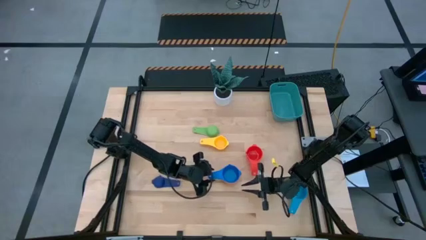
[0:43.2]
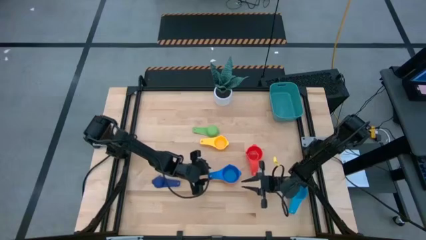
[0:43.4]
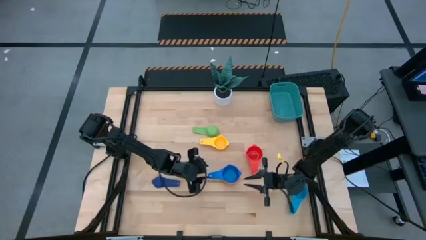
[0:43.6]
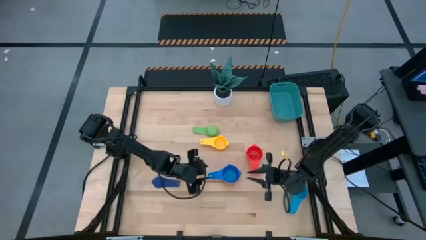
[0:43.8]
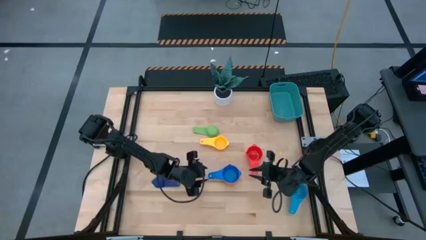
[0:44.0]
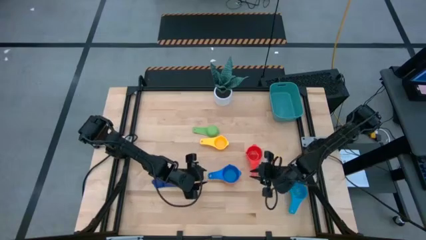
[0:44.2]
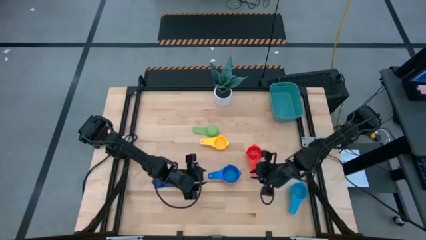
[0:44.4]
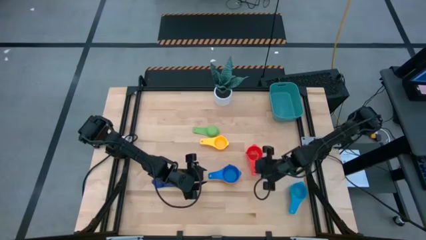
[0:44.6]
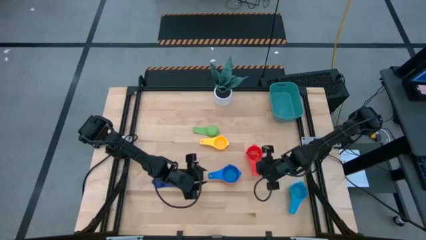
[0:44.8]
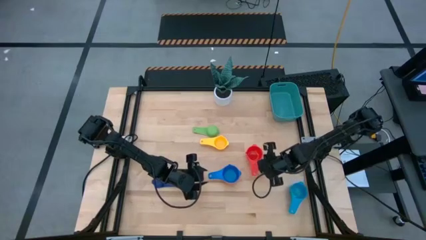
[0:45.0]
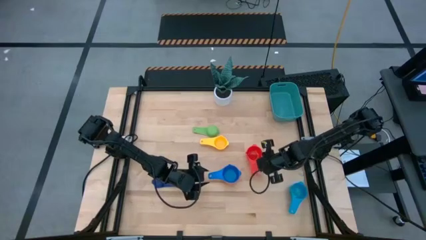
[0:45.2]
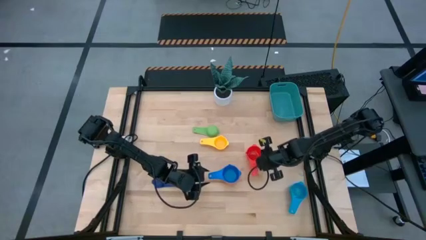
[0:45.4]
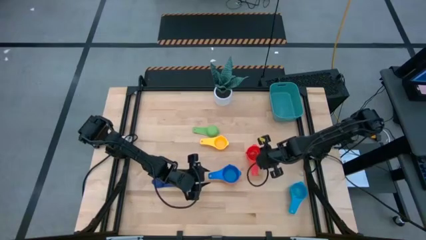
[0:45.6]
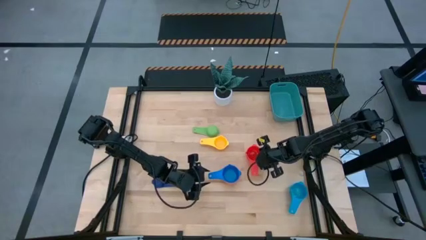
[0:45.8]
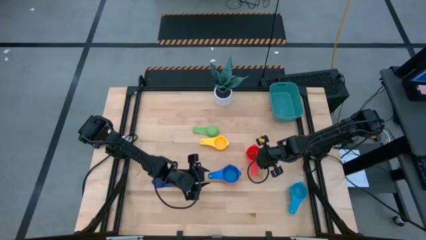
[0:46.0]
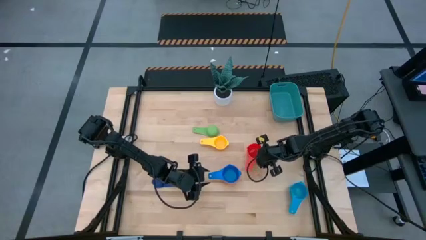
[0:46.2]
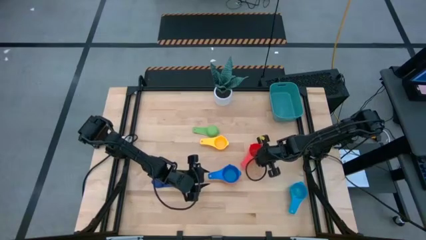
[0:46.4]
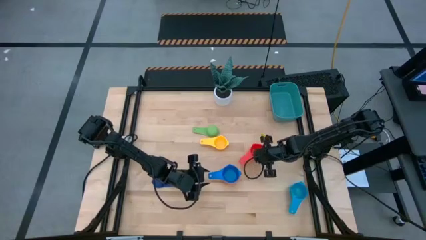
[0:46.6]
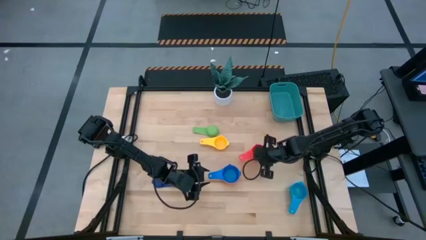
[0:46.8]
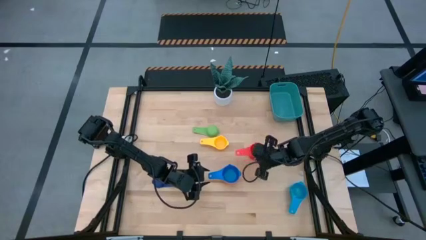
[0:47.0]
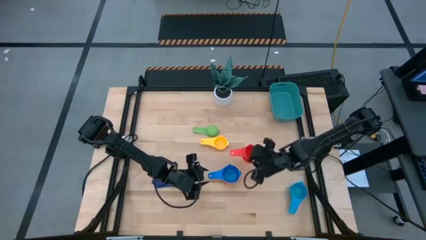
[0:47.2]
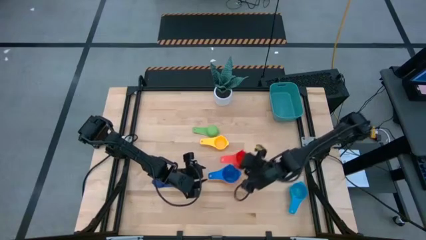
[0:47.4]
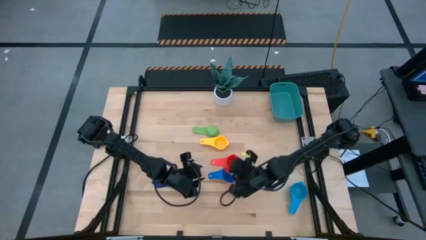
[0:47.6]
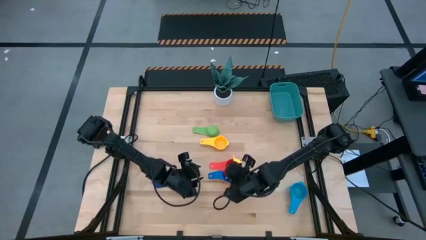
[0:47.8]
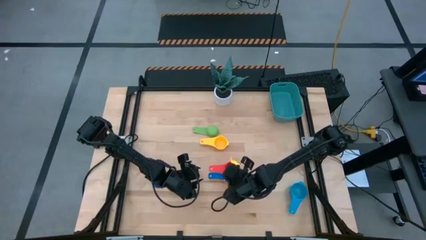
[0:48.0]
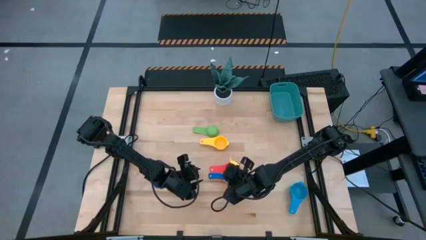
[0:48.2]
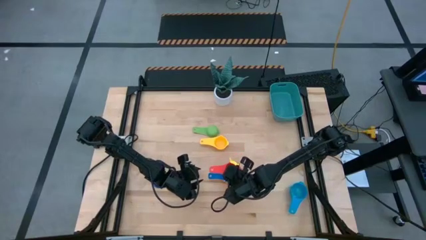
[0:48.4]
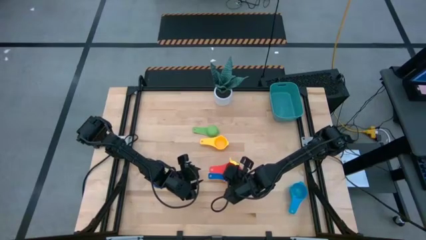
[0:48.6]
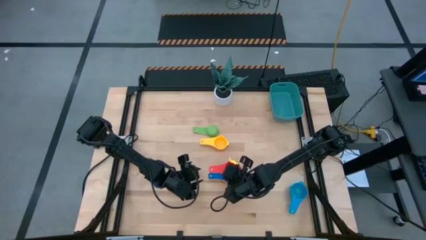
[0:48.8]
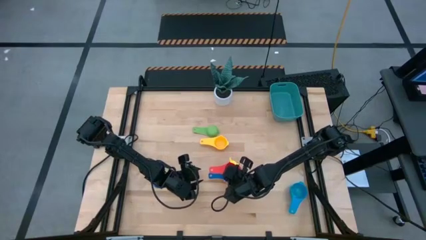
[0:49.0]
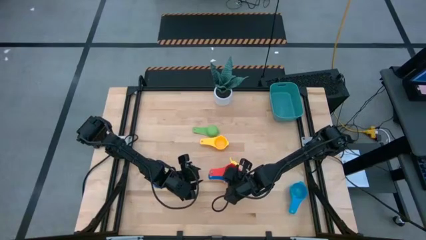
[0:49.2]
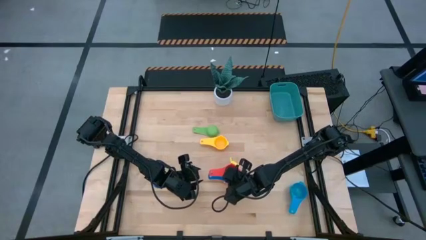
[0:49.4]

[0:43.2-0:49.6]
Task: Nest measuring cups in basket
Stack the red measuring cup on top of the blue measuring cup

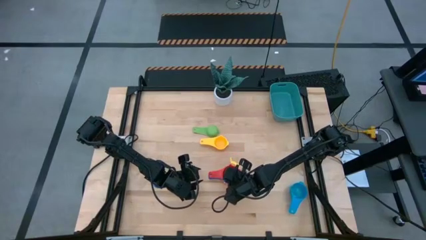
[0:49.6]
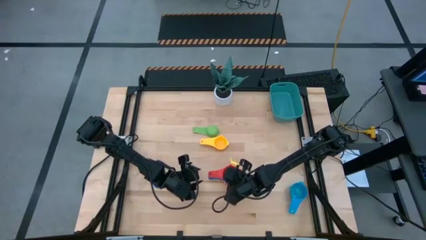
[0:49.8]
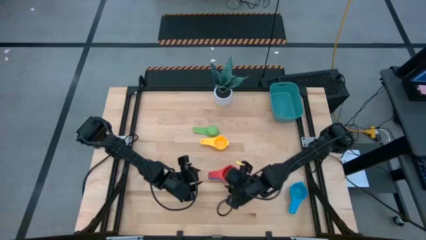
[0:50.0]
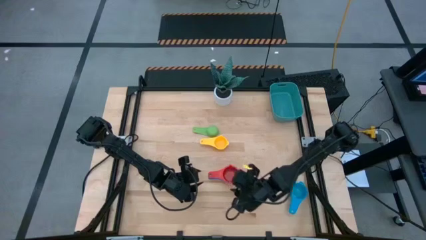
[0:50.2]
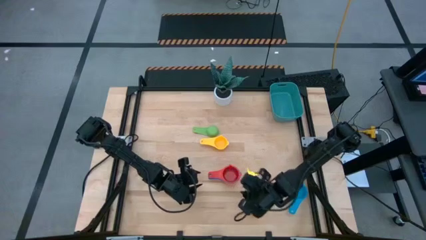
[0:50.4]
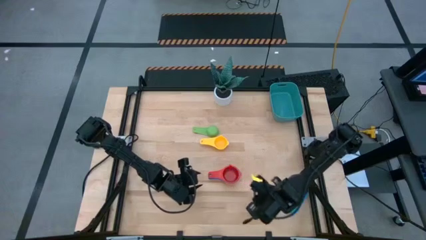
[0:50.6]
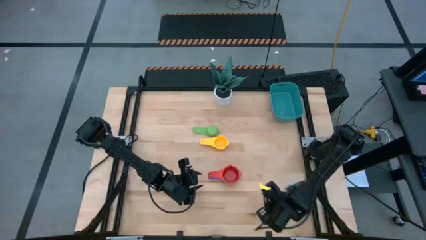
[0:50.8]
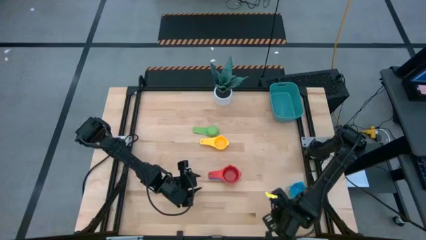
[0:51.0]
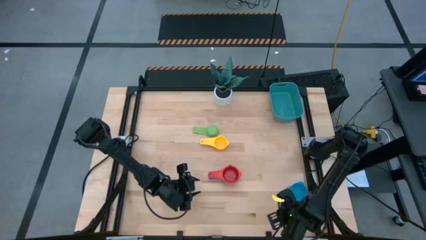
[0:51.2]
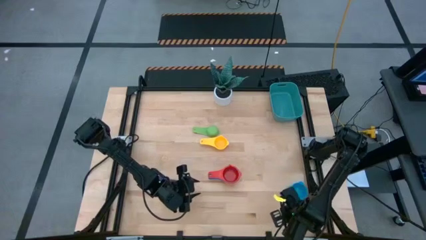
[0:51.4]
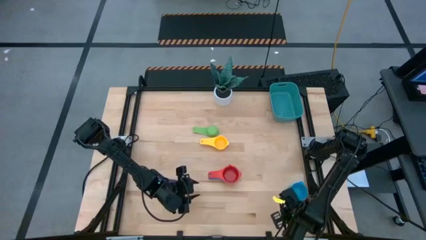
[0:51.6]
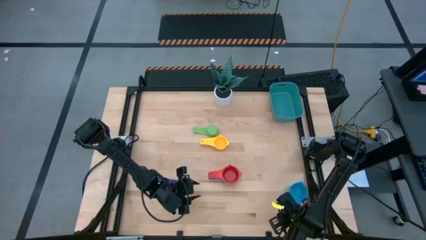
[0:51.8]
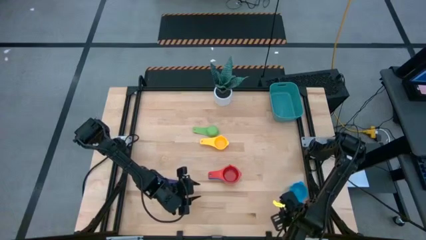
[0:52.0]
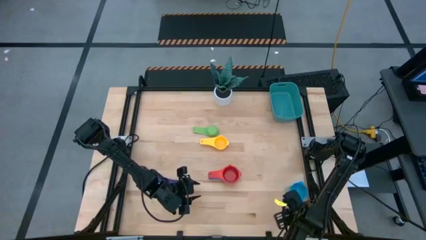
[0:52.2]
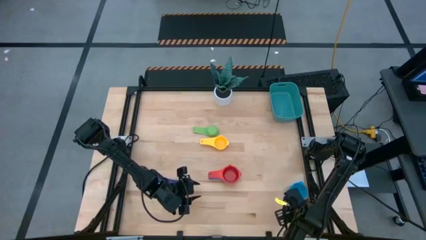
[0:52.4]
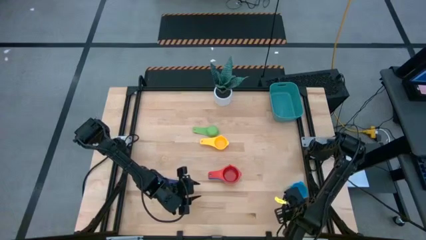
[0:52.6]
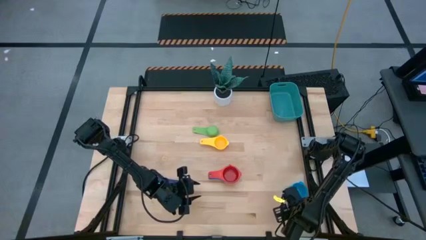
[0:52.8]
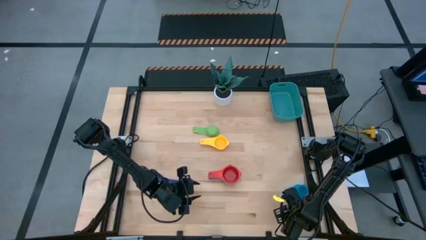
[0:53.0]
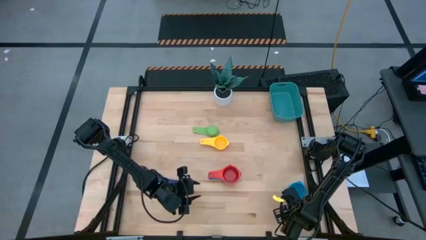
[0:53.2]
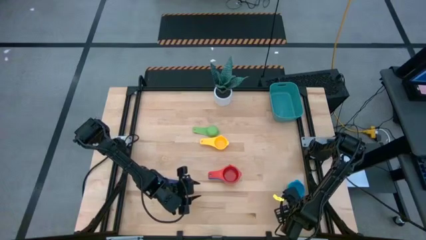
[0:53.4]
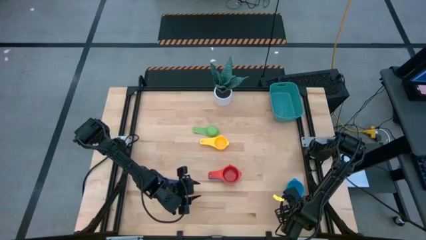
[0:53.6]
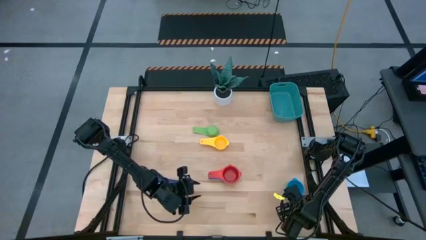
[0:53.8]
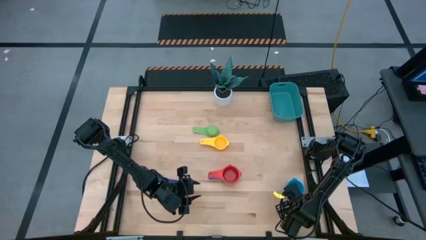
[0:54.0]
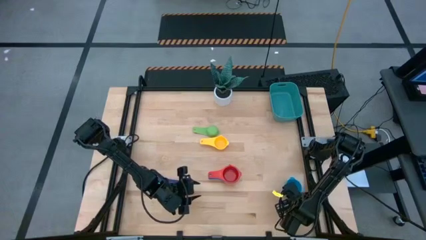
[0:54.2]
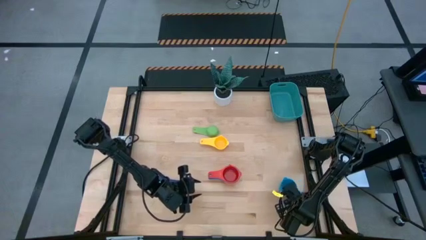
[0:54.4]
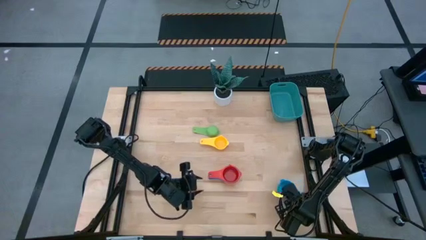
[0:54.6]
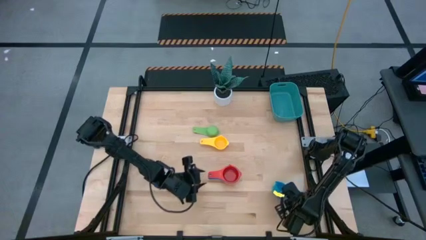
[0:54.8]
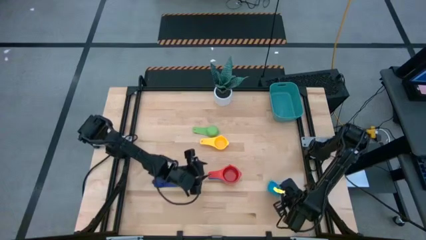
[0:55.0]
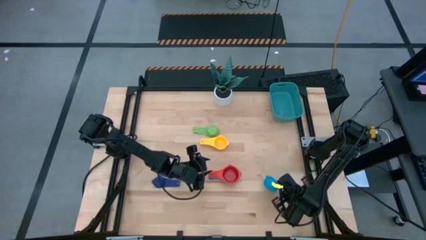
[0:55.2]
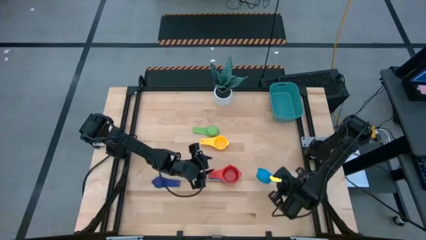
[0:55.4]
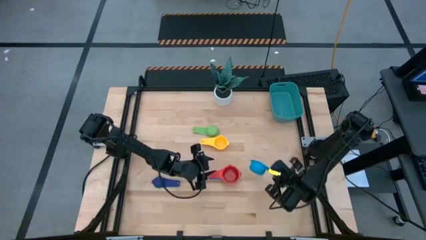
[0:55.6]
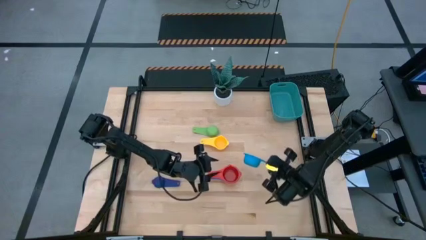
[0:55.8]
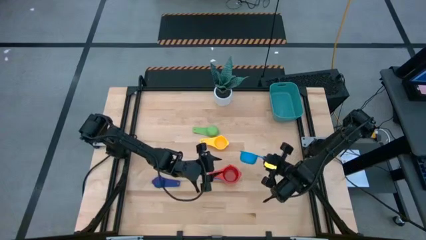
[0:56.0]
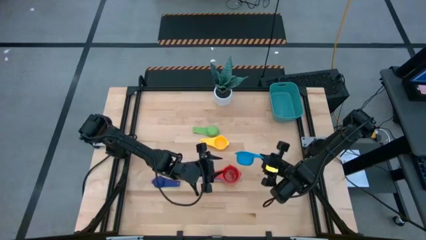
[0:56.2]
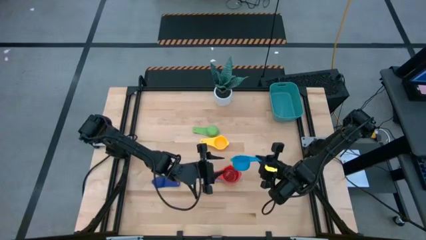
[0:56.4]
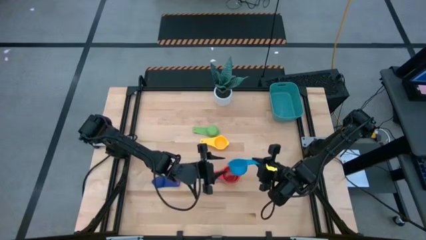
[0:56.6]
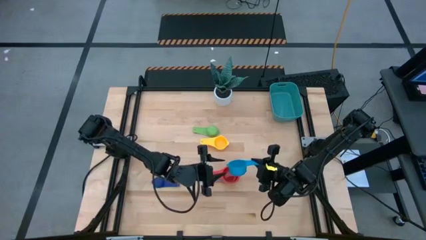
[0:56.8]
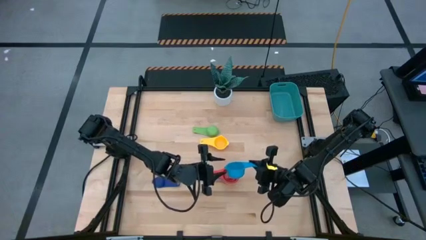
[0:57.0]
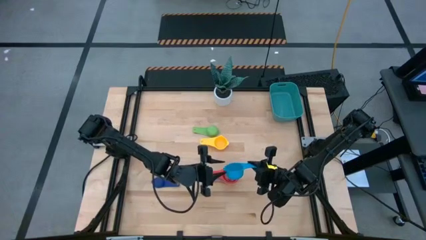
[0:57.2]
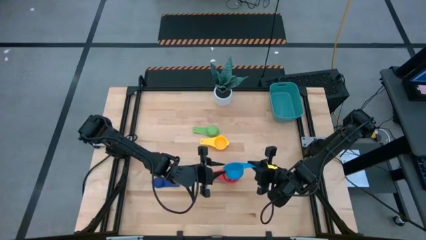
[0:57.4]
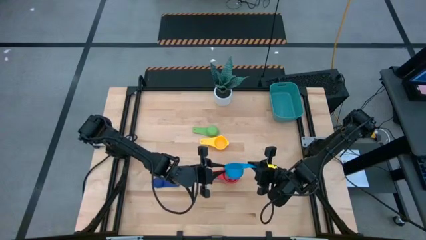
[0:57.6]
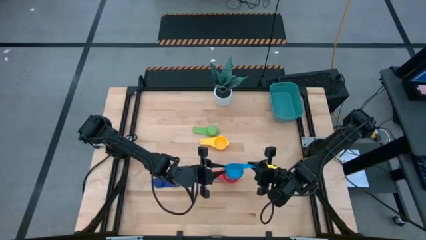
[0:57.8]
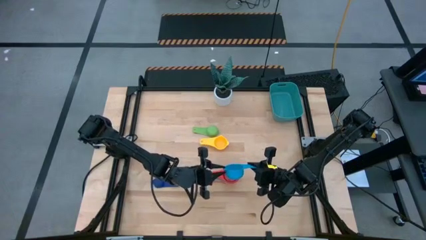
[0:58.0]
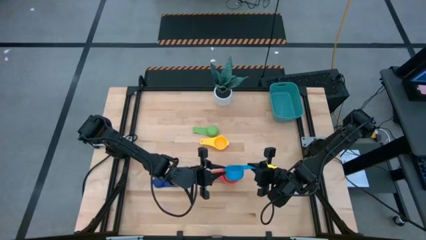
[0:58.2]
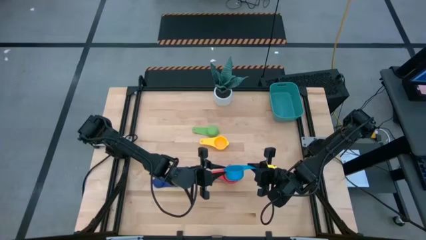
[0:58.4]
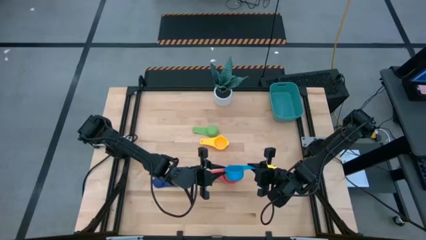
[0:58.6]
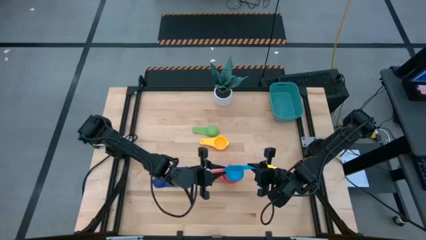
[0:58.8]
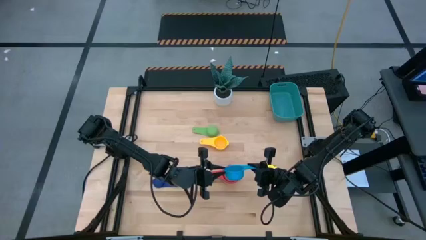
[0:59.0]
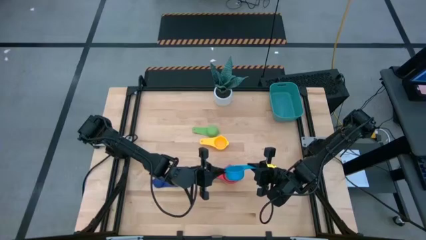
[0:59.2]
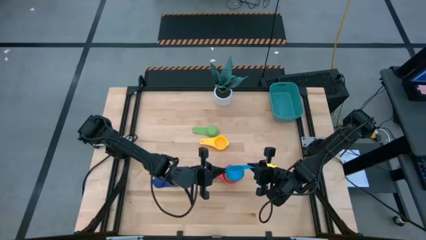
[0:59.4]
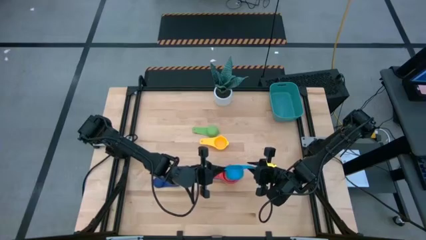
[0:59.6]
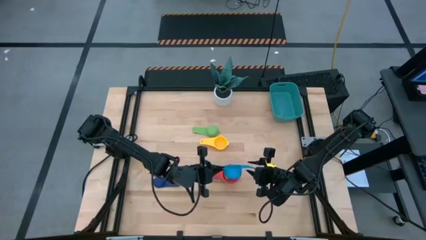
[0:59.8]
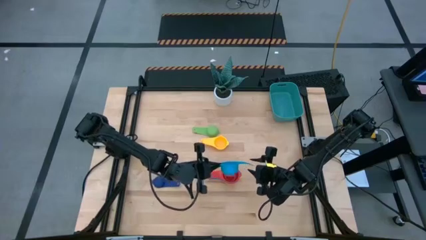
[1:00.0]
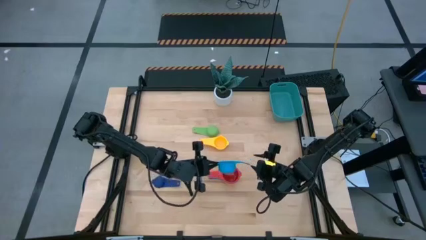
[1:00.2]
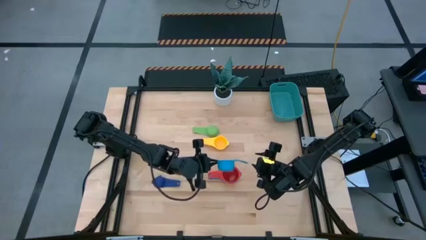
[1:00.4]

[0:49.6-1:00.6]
Stack the light blue measuring cup on top of the red measuring cup
